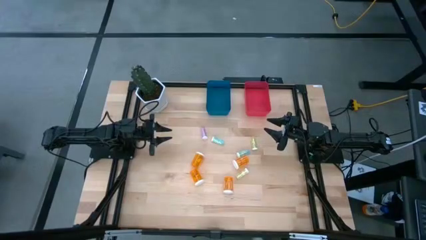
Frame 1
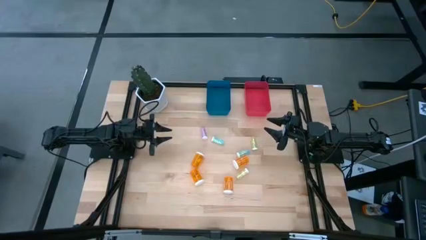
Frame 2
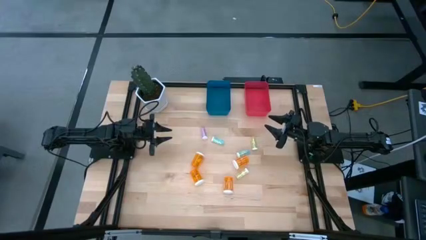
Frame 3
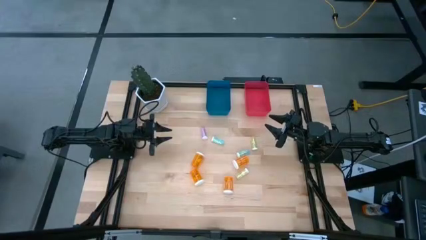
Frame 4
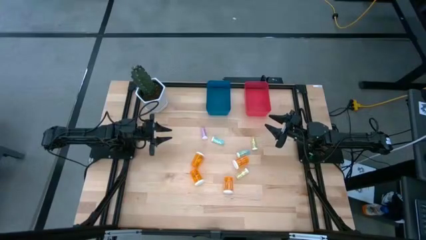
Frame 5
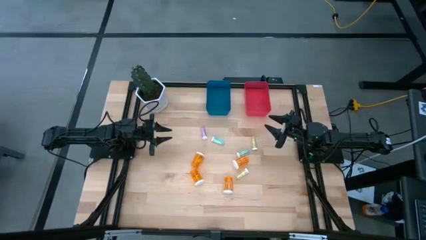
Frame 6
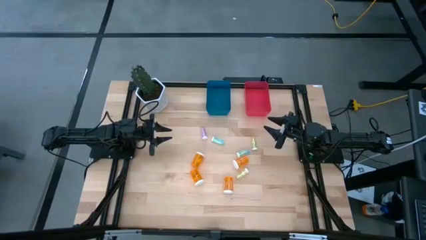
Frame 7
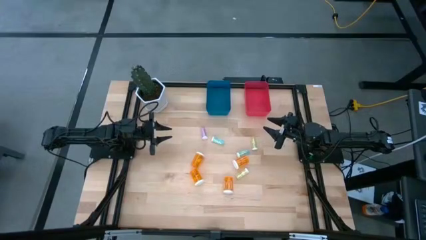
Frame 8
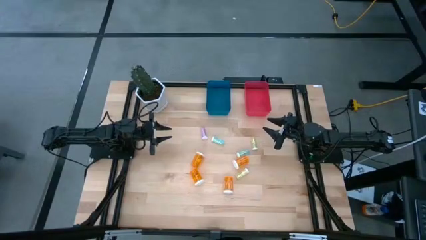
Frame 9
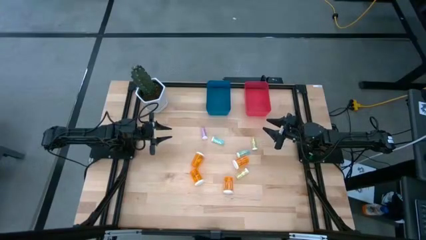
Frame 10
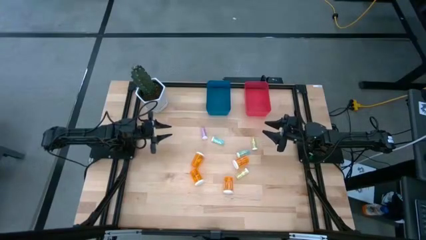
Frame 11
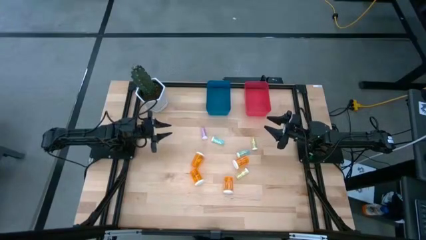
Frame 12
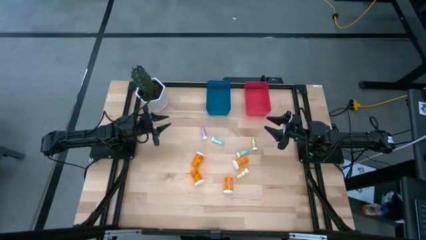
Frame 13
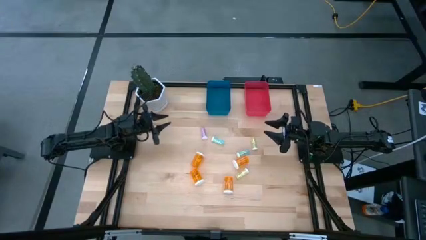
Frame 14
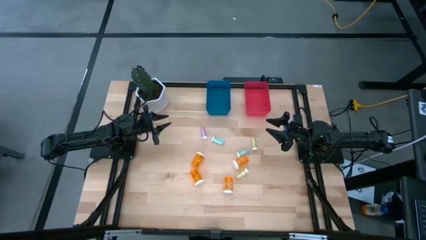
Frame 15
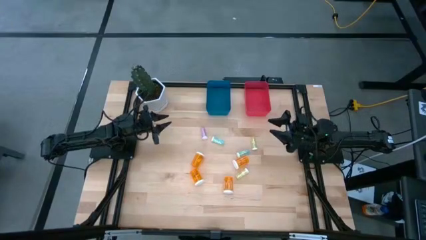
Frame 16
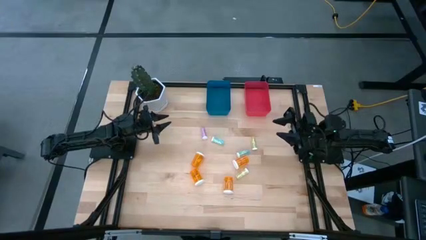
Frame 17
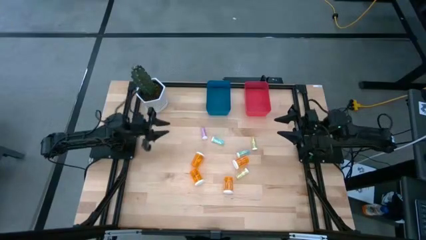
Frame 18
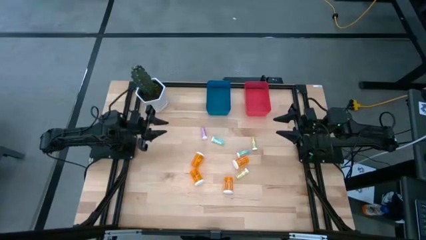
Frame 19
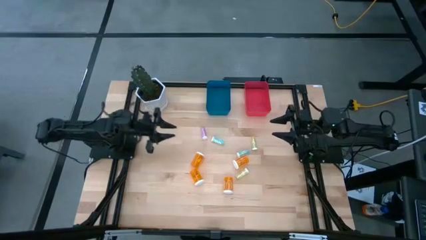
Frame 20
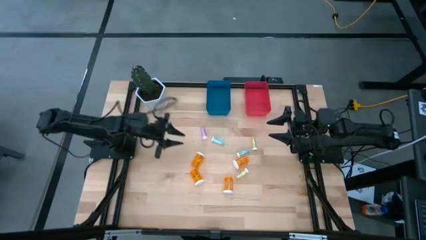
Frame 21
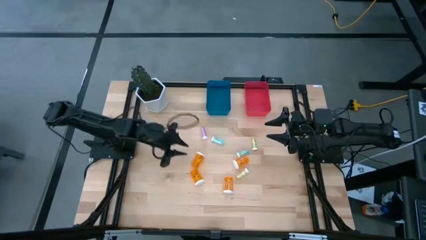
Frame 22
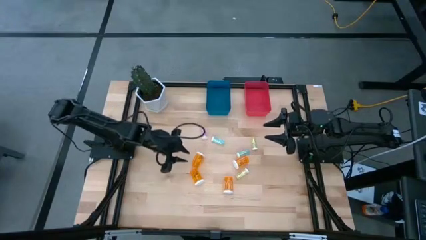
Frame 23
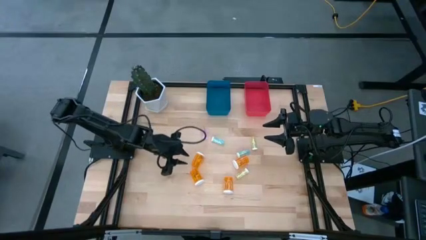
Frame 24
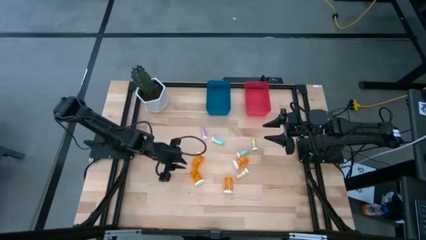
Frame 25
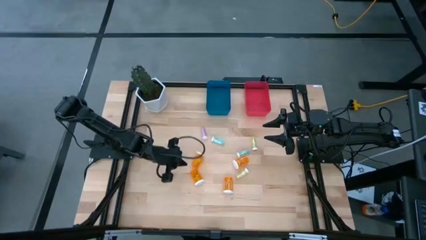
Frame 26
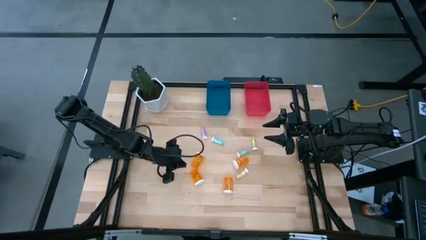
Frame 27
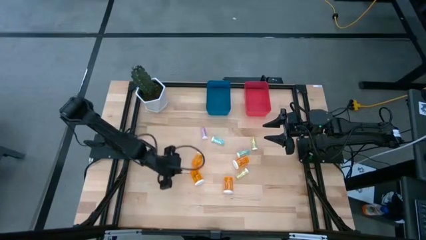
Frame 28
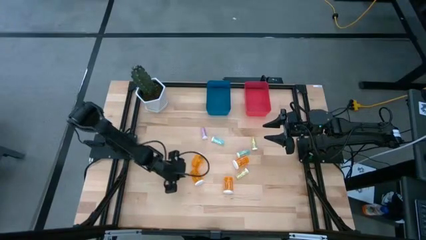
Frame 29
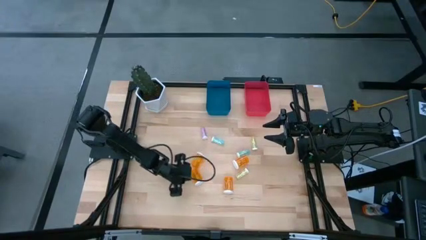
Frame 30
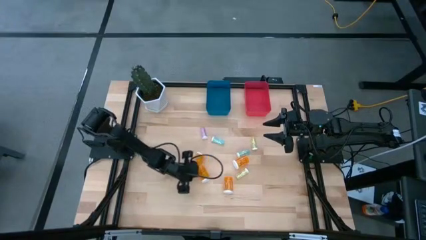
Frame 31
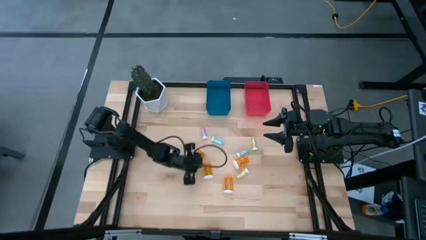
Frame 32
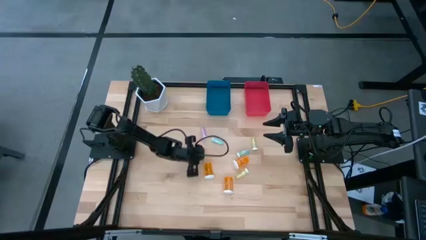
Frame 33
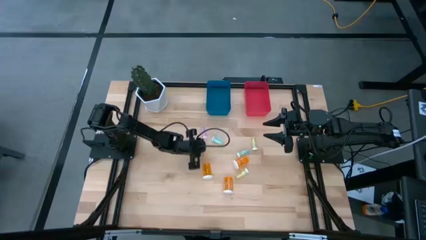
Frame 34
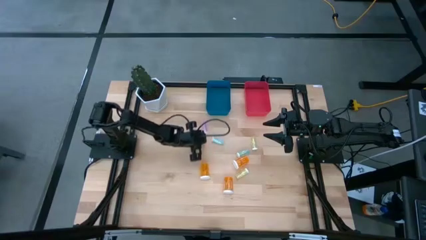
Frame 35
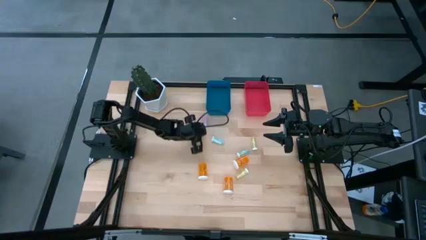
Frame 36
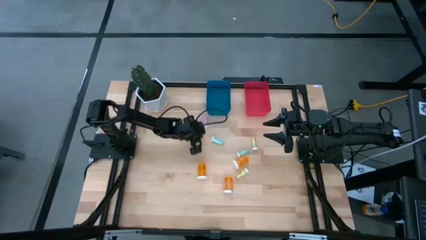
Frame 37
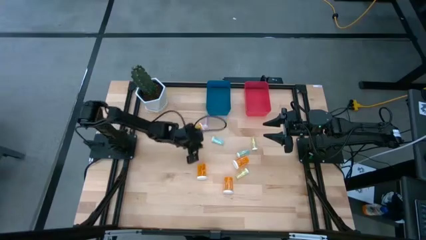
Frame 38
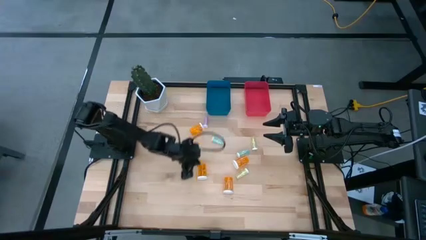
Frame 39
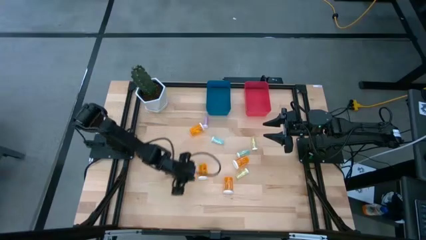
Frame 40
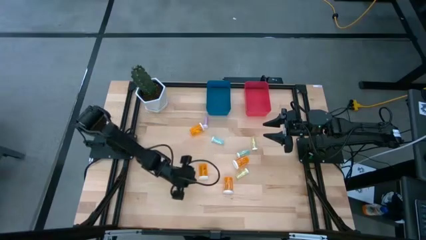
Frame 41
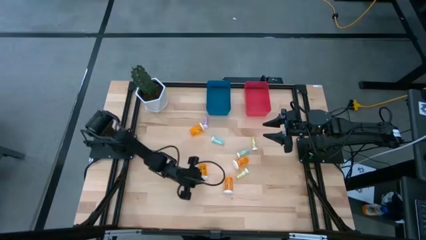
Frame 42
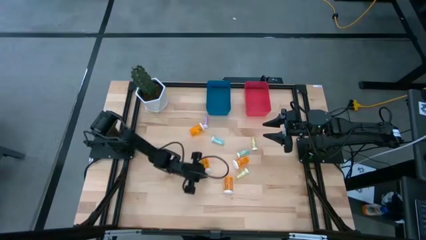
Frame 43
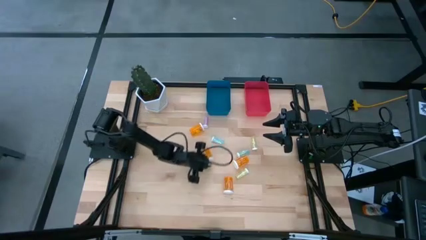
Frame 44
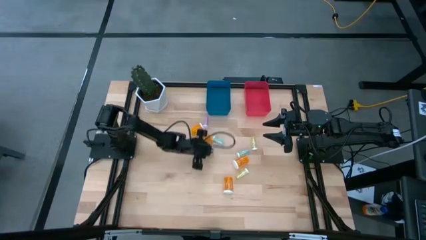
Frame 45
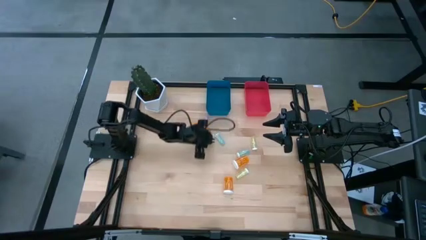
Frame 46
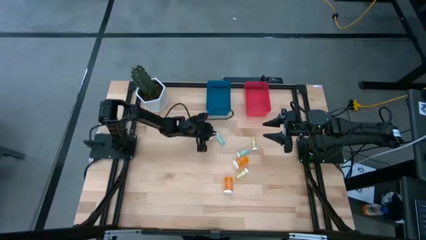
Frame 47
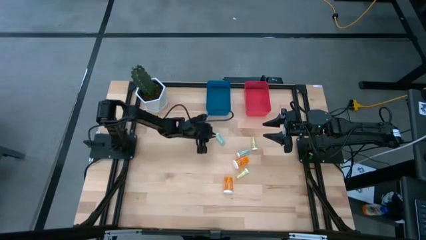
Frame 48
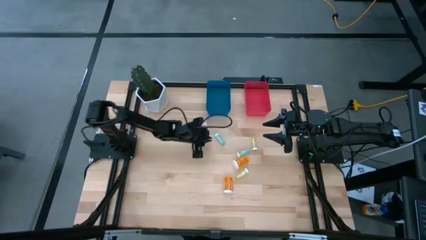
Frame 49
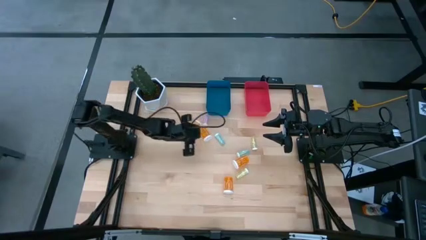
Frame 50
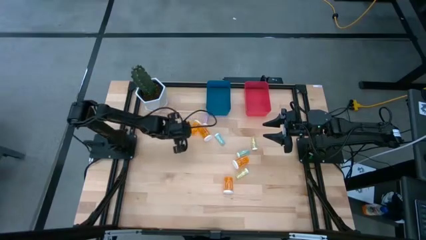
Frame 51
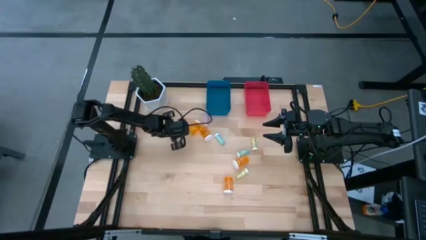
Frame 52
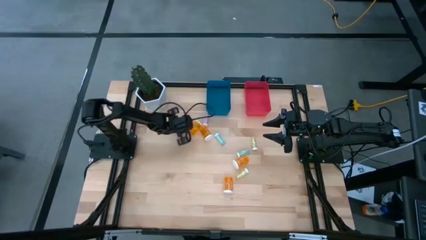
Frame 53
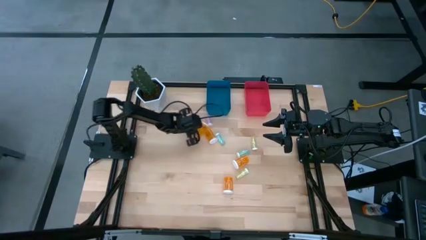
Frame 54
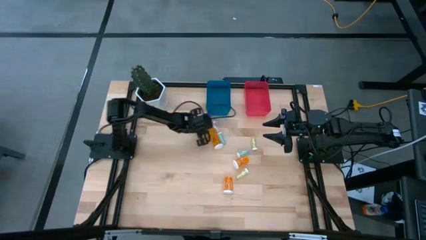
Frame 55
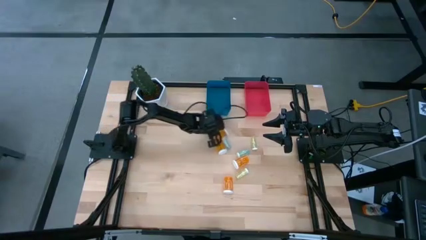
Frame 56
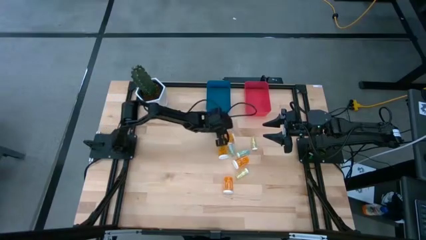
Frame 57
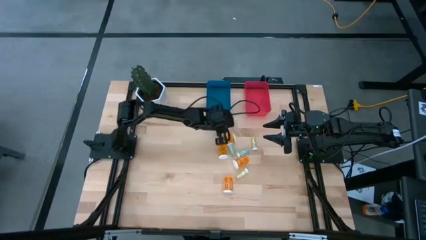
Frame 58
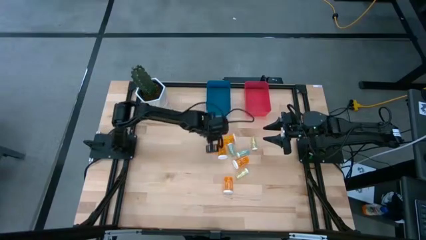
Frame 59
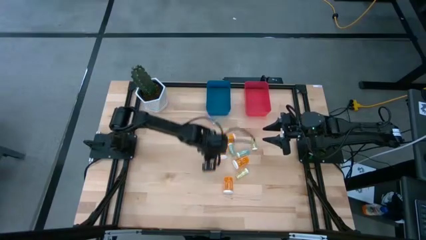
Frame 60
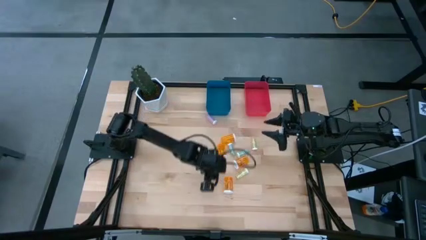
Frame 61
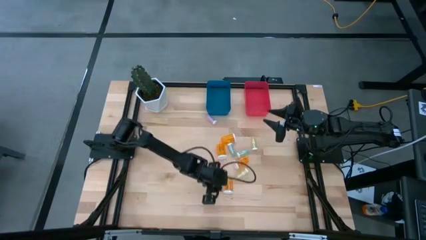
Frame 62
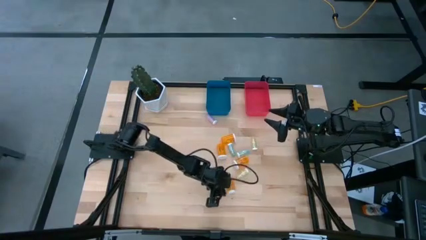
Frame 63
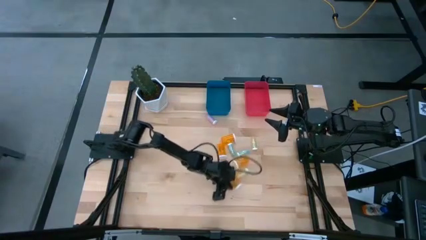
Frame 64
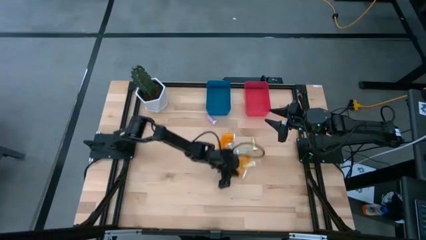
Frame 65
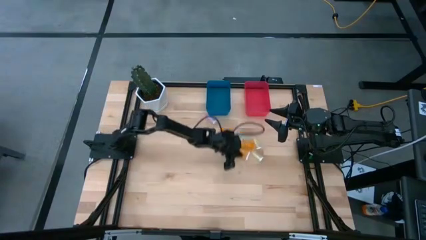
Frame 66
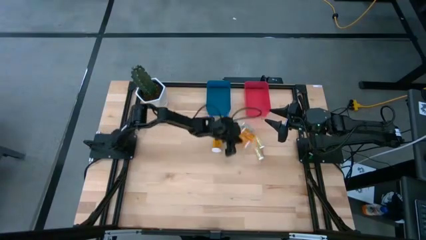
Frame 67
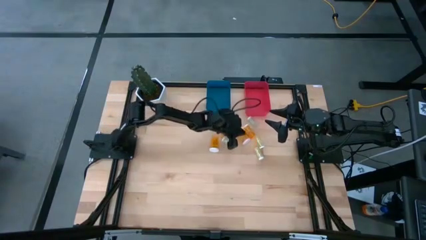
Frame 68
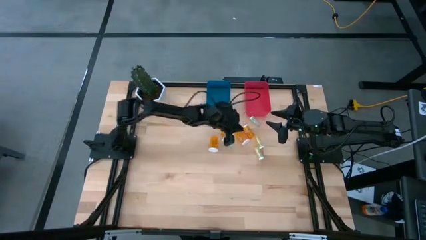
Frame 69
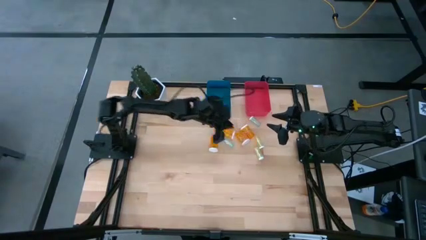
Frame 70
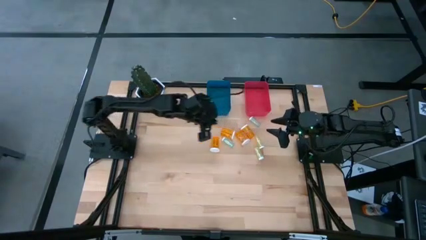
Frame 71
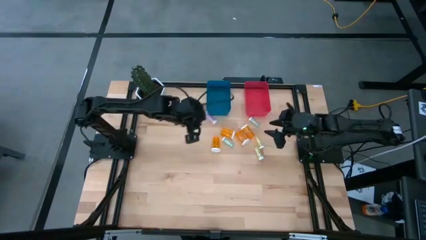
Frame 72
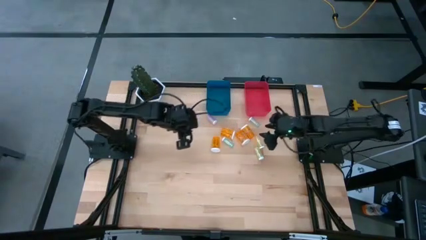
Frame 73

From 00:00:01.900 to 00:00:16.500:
Task: Pick and place medicine bottles into bin by pill shape (circle, oval)
Move the pill bottles from the middle to the top middle

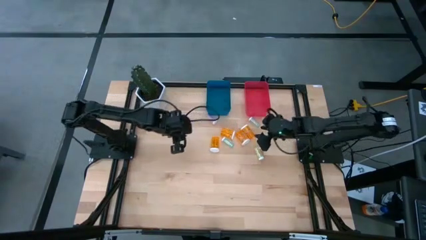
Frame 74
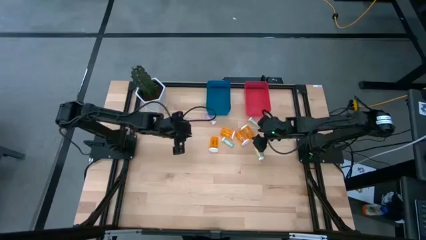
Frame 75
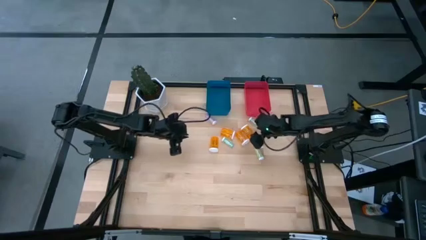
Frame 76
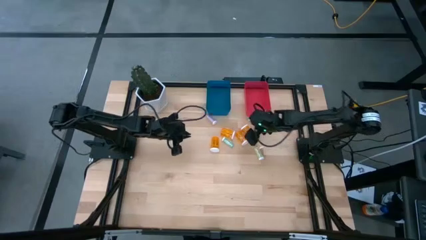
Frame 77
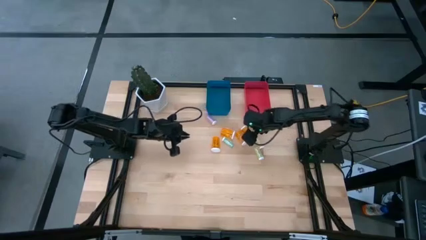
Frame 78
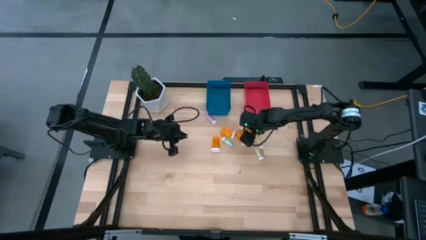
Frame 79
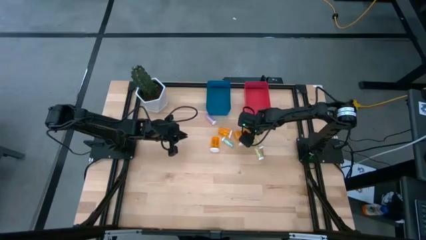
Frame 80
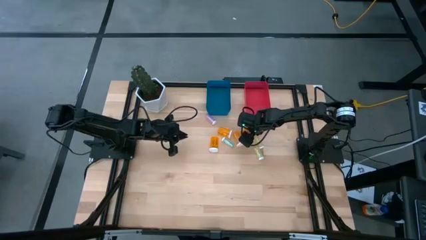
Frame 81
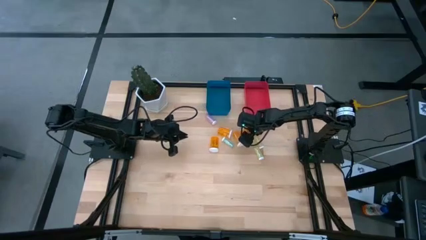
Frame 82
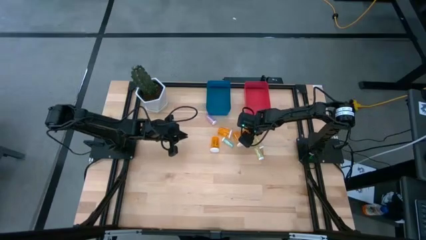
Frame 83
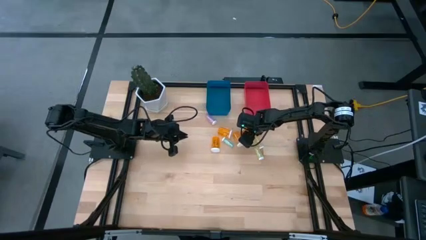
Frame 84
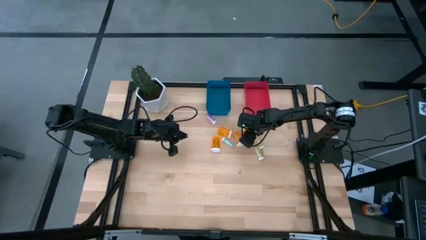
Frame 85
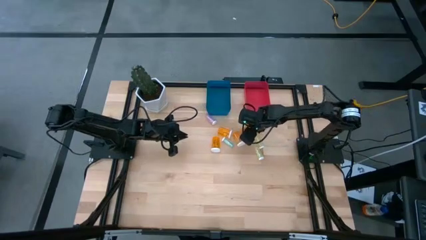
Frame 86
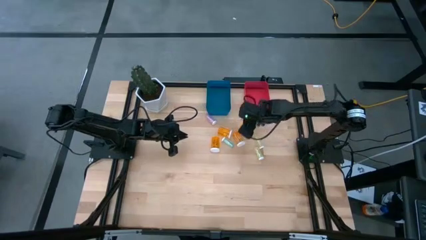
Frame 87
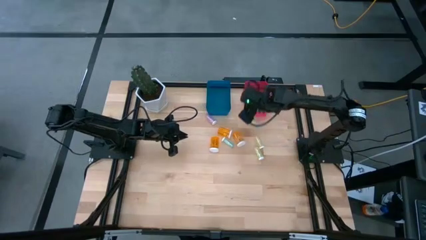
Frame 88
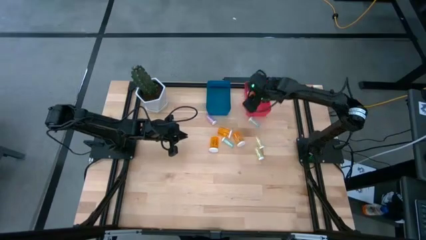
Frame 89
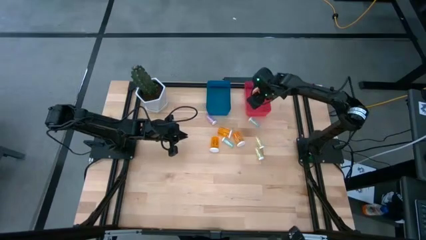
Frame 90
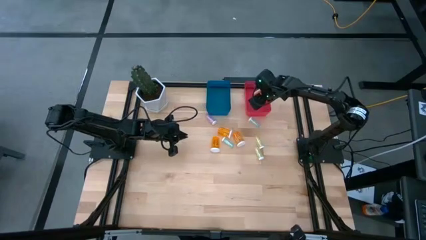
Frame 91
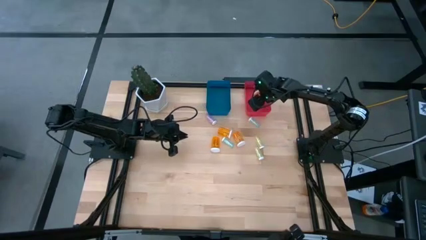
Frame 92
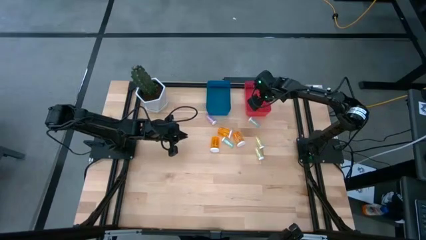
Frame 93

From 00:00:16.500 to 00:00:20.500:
Put the large orange pill bottle into the red bin
